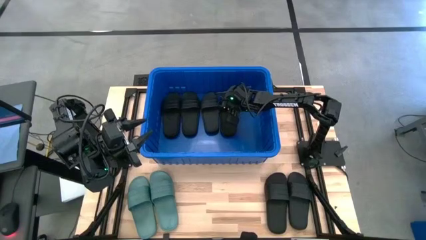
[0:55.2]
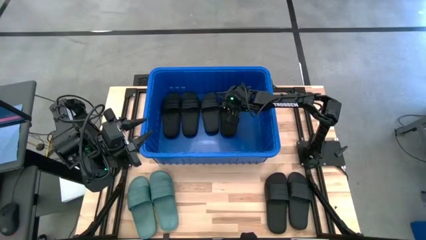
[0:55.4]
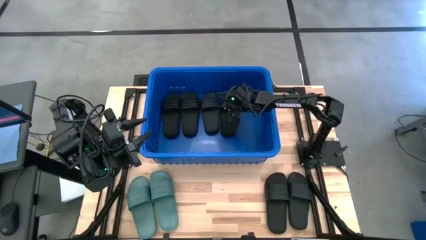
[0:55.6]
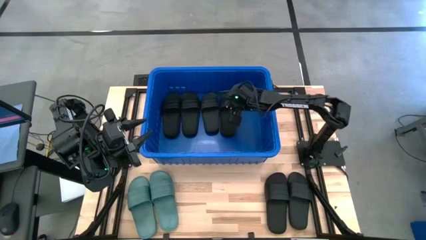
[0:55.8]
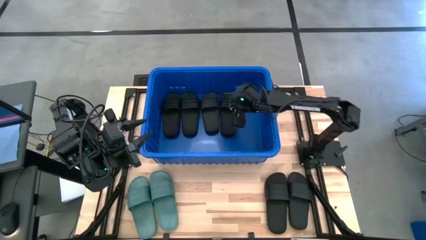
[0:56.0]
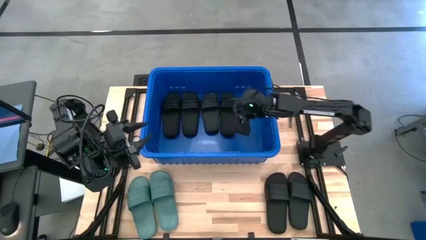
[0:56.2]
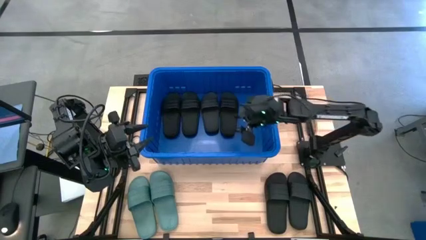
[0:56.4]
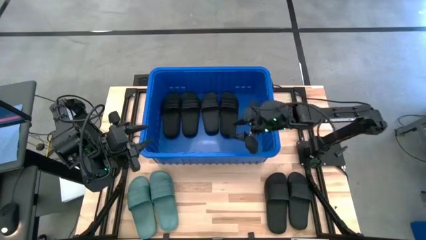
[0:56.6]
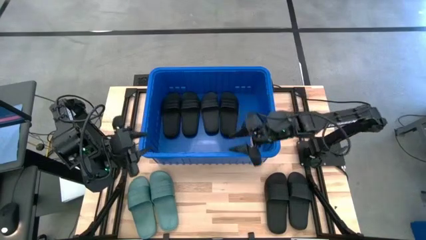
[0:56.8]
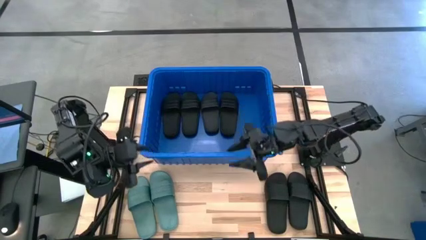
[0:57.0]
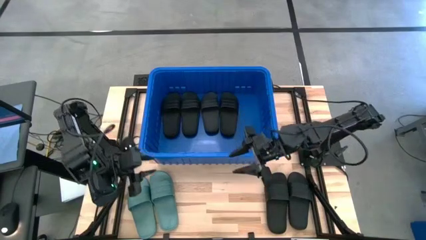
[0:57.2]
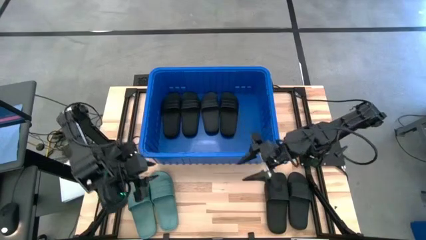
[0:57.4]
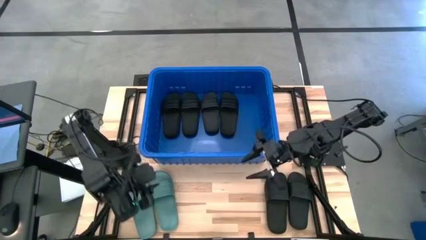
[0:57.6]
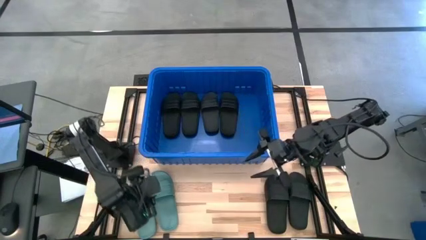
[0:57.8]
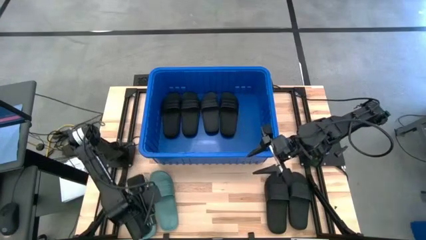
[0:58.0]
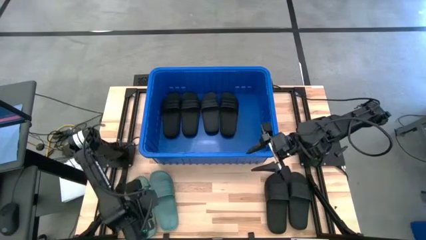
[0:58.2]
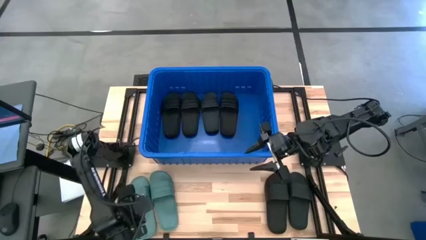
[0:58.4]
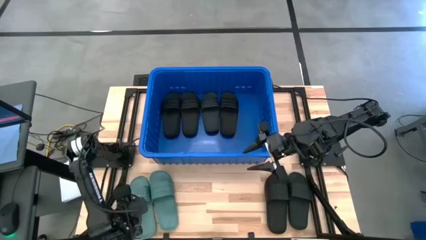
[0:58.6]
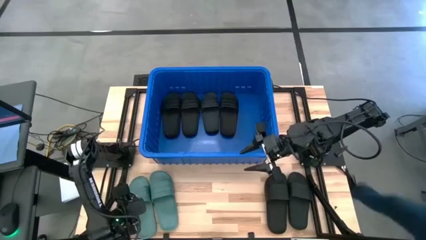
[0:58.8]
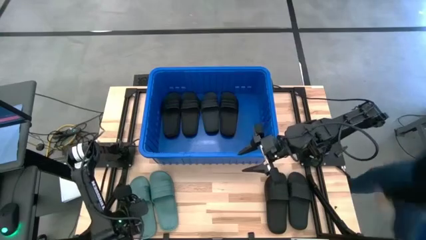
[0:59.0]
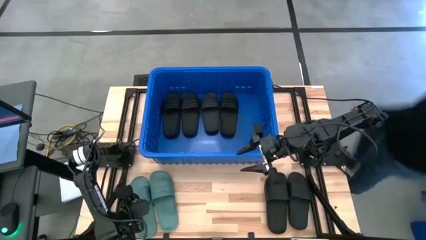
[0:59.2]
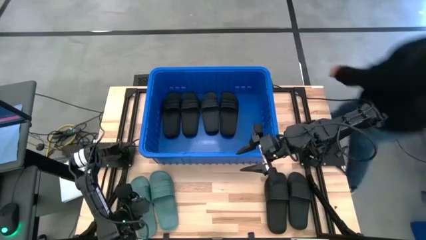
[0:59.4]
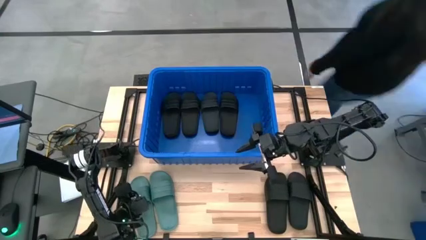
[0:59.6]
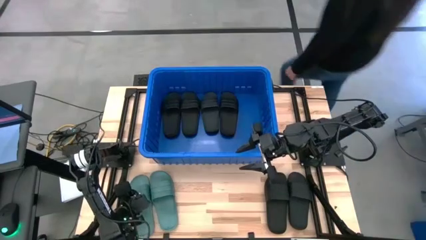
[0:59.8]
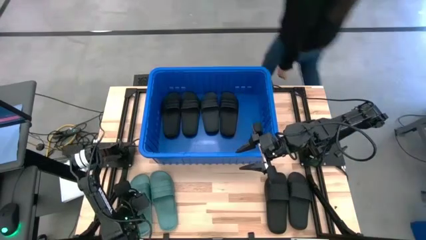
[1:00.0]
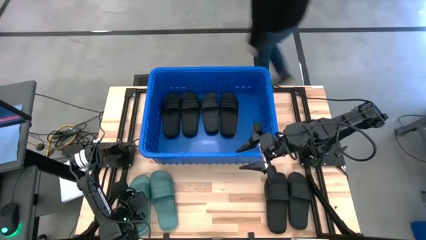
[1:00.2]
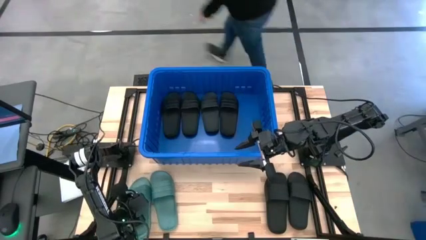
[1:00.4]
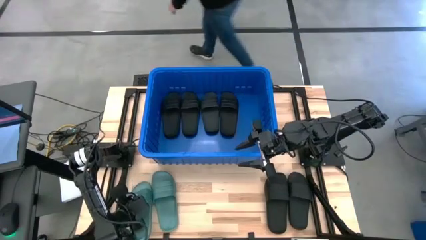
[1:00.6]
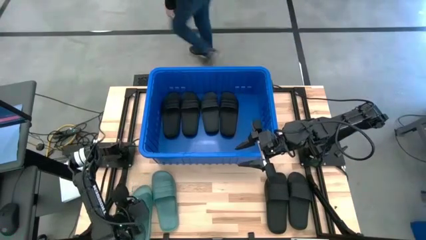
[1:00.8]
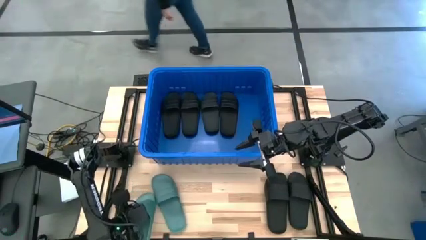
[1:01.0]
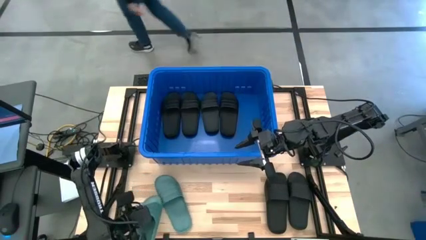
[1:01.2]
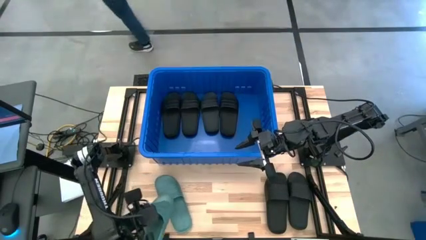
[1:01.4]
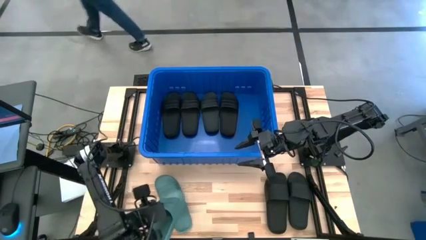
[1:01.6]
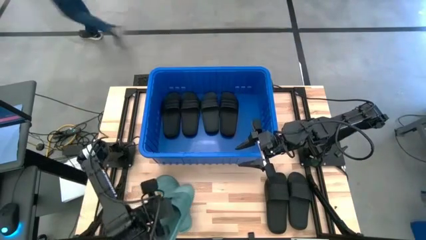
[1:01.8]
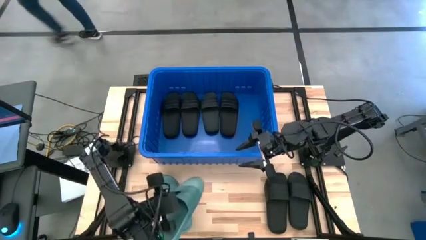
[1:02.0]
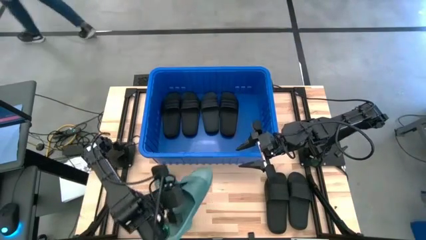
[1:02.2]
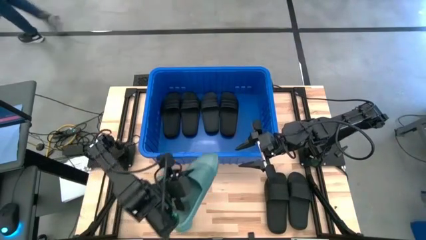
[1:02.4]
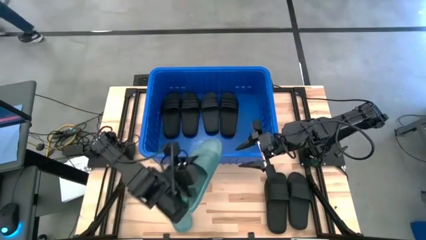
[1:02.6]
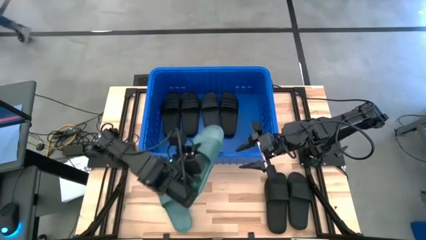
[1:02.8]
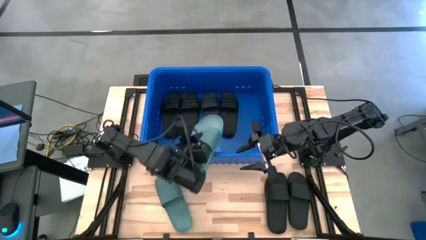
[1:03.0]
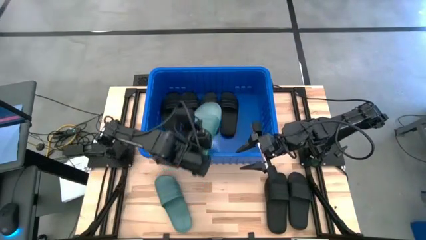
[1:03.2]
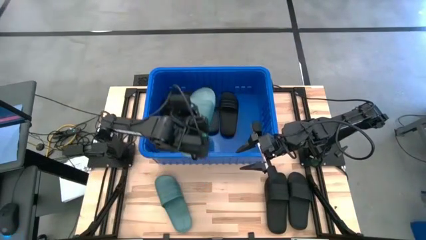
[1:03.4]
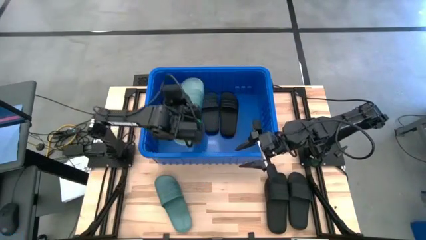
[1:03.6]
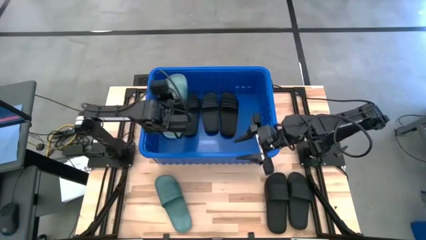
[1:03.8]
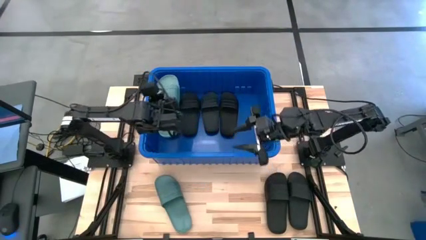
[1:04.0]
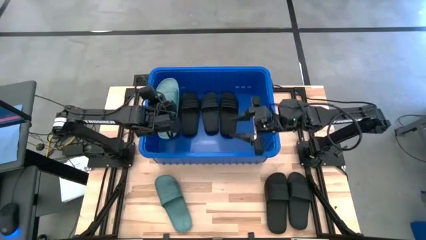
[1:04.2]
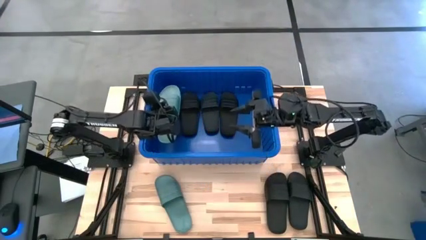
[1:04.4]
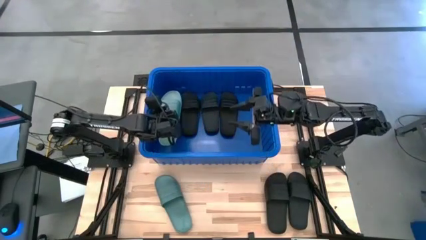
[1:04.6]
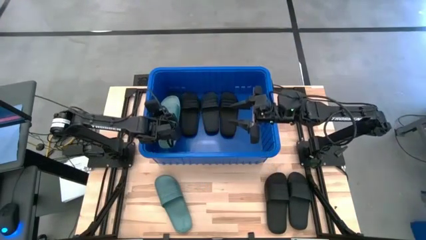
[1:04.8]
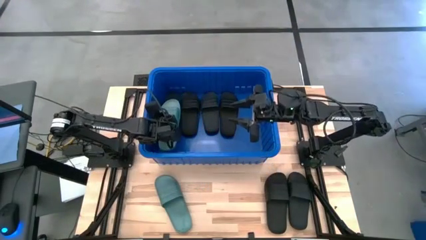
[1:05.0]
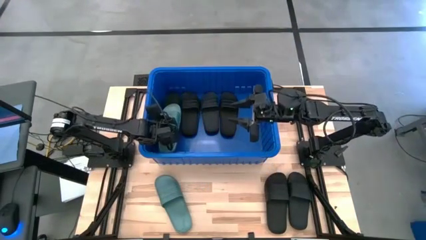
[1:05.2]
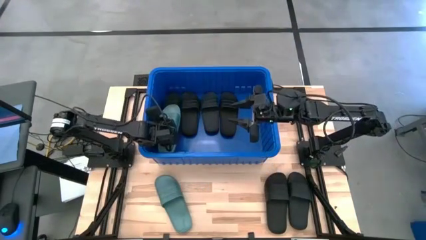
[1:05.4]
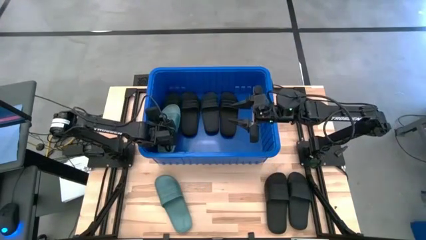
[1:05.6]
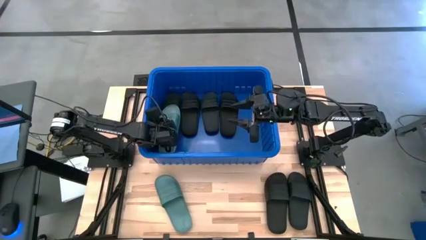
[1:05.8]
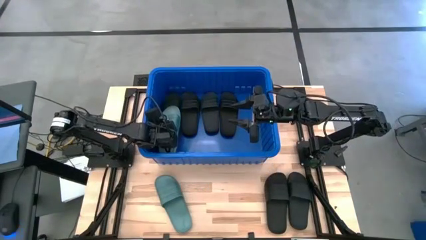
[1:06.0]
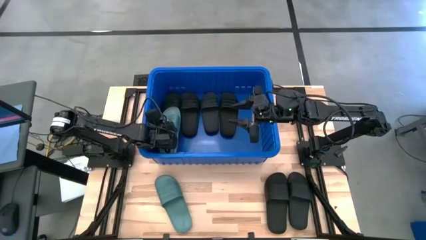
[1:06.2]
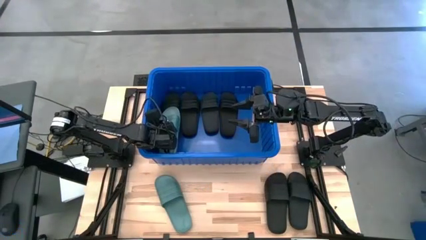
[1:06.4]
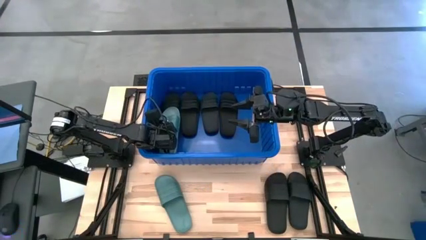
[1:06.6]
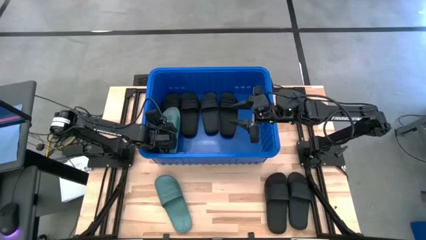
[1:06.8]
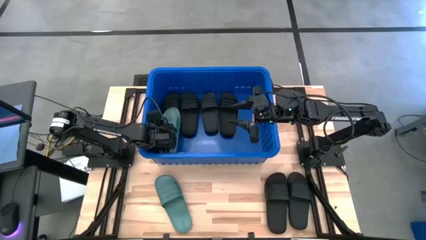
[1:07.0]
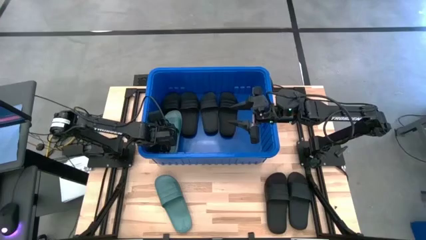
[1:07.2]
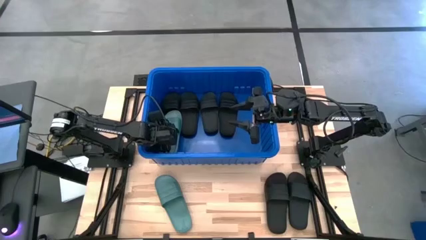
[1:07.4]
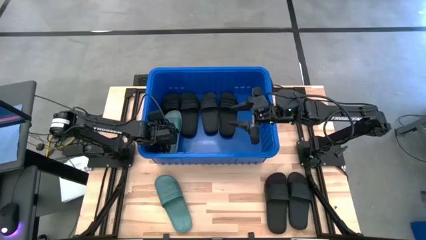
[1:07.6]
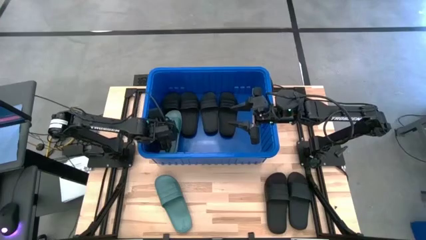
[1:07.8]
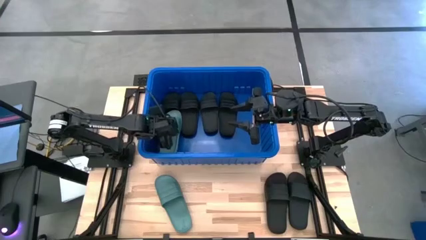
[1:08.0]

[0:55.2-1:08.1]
Task: Pick and place slides into bin
Put the green slide into the blue bin

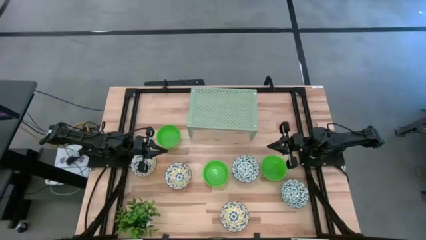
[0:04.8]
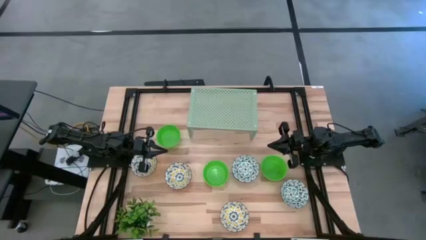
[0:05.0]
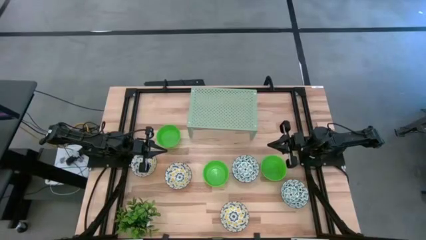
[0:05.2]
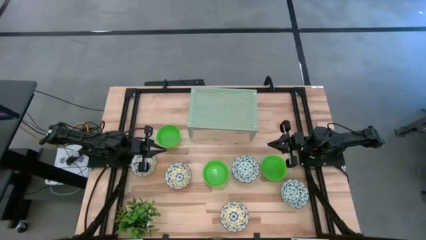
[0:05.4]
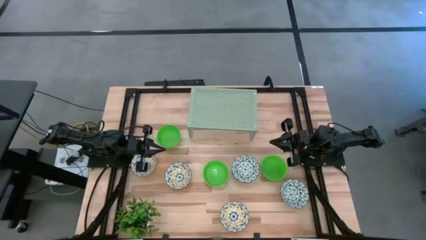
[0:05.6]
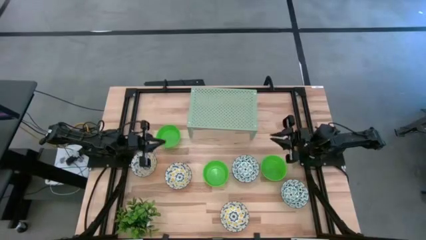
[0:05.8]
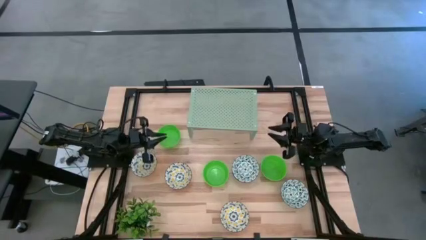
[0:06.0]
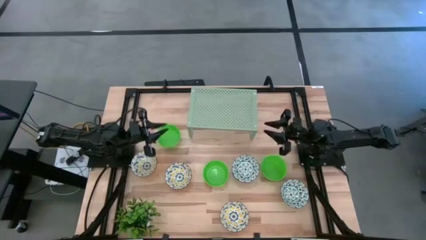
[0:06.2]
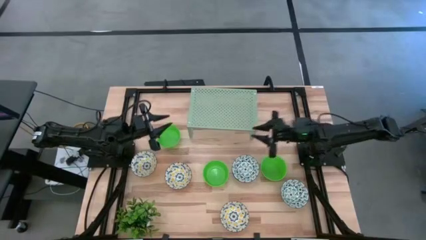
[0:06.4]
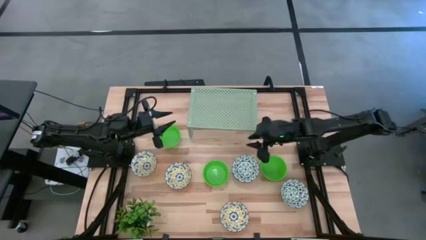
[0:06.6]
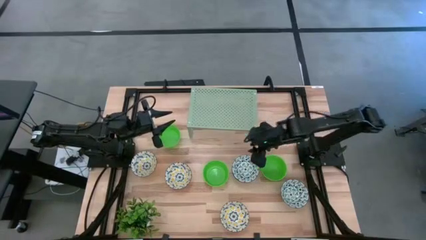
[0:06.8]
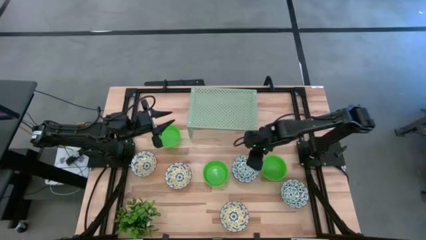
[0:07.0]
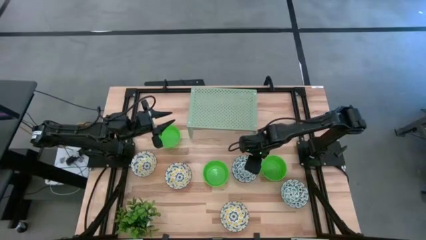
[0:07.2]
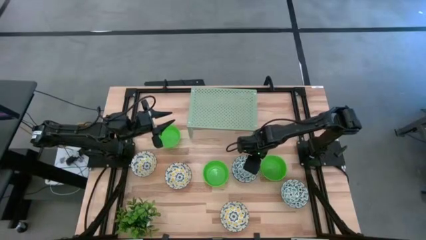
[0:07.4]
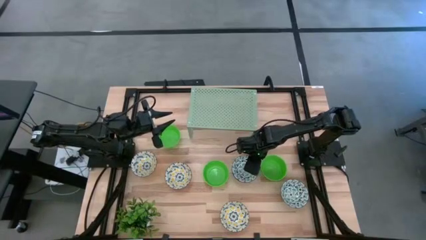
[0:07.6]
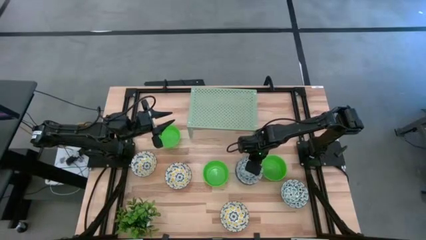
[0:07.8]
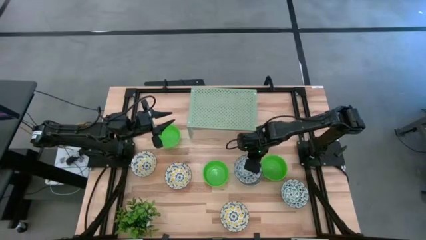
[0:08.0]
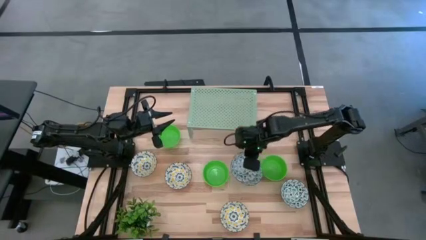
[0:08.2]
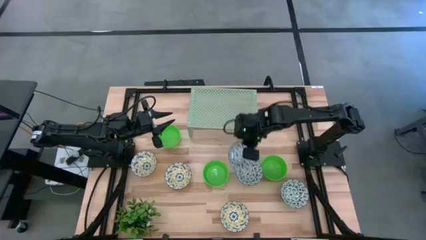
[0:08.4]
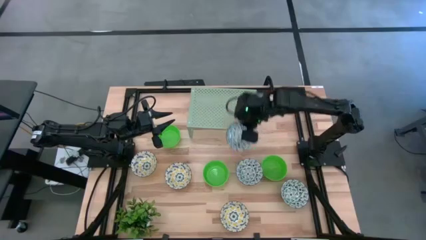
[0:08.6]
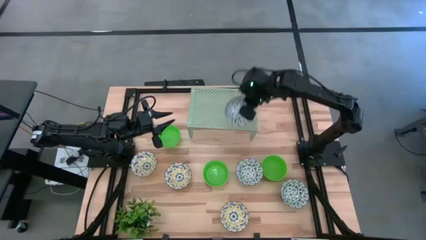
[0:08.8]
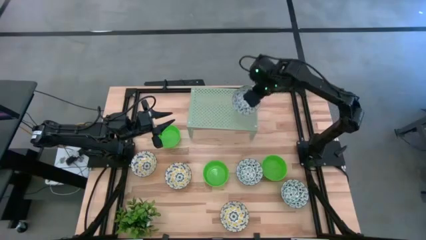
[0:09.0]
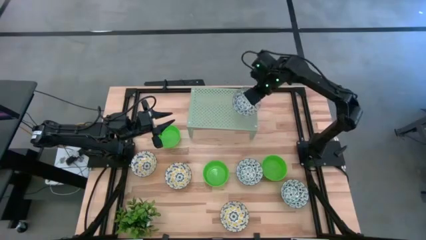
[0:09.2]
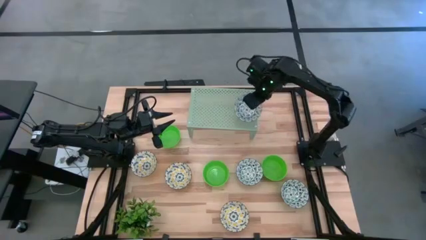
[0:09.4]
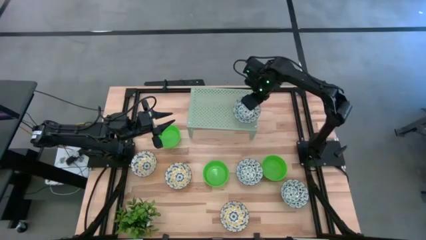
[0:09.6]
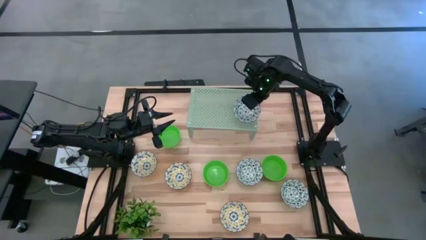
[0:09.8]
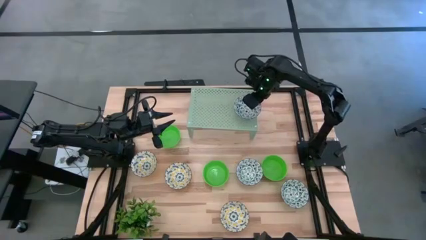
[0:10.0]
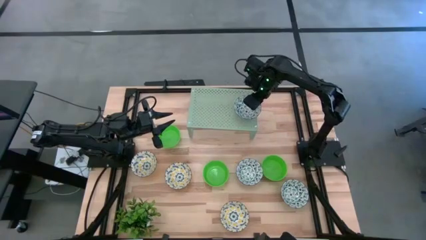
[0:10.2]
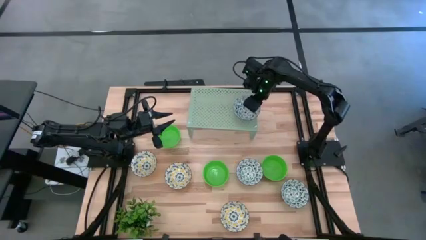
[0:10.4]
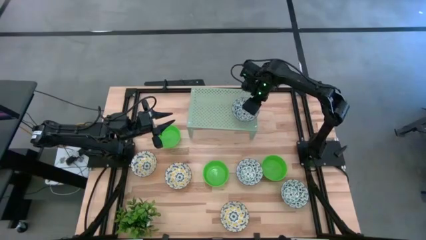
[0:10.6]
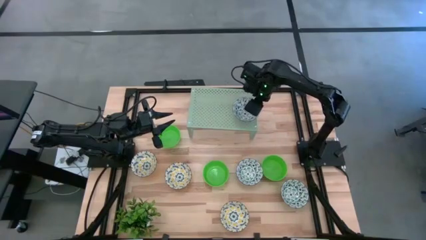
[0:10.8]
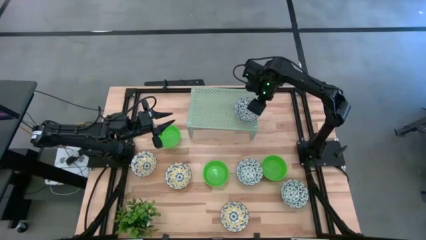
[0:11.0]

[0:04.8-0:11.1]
Task: Pick & Place Mini bowls
Put the left blue bowl on the shelf
